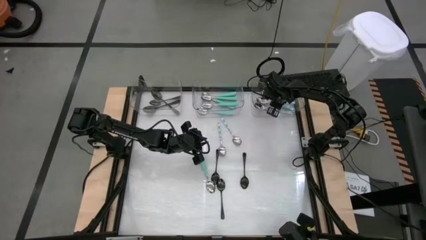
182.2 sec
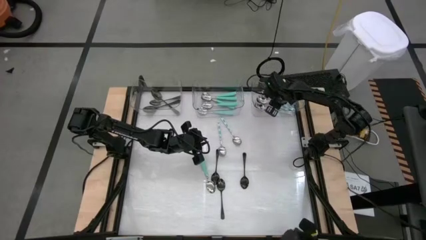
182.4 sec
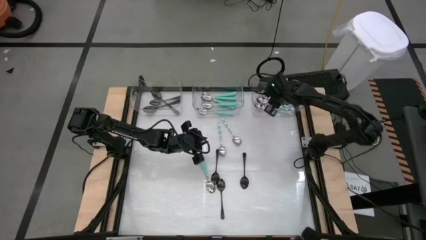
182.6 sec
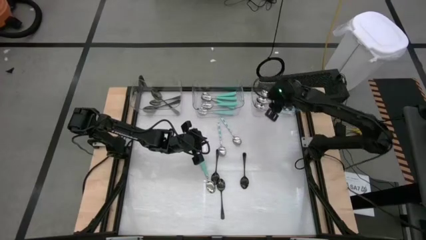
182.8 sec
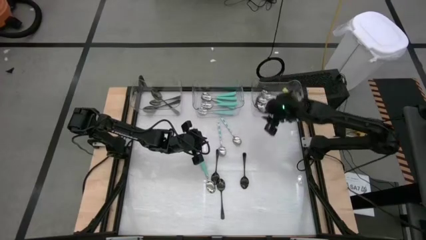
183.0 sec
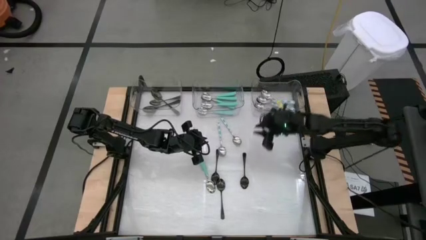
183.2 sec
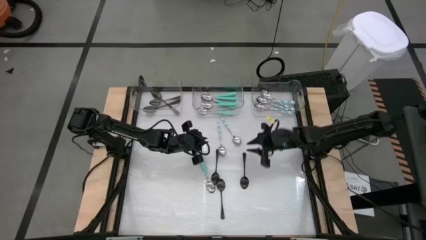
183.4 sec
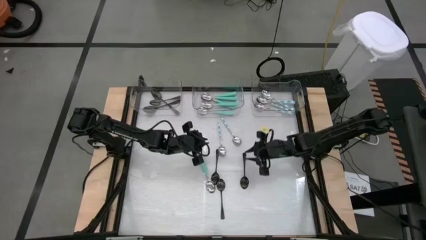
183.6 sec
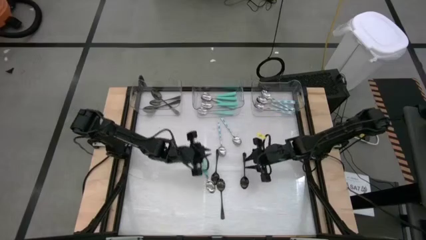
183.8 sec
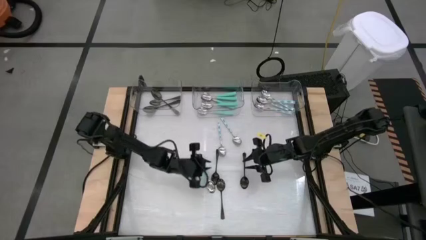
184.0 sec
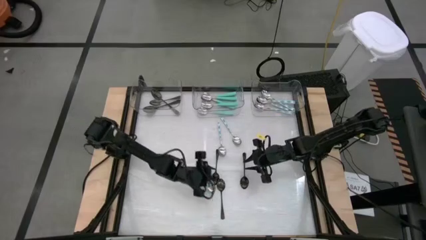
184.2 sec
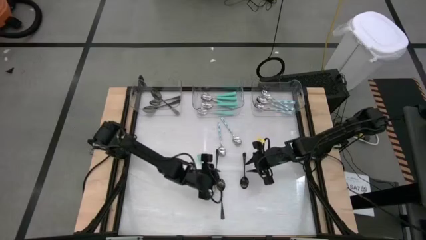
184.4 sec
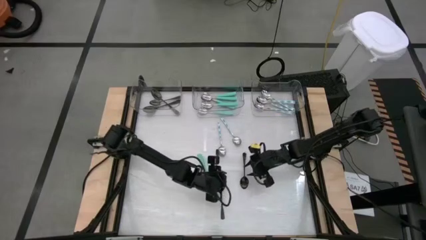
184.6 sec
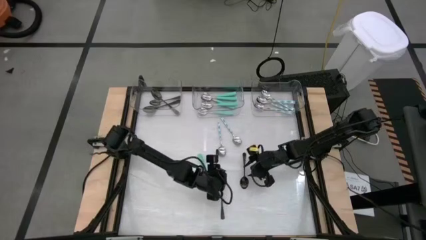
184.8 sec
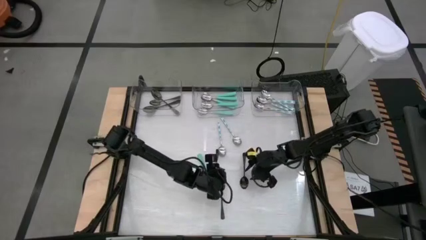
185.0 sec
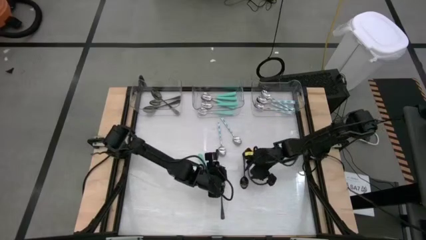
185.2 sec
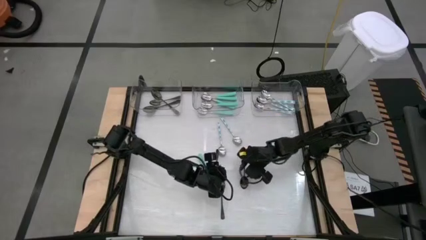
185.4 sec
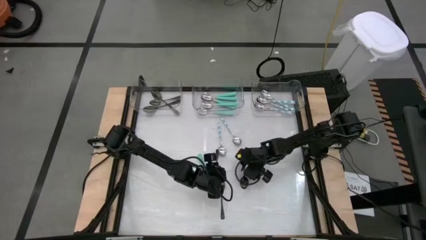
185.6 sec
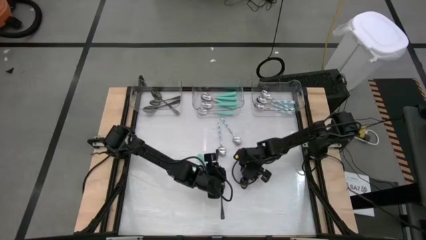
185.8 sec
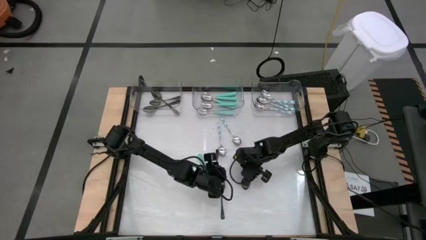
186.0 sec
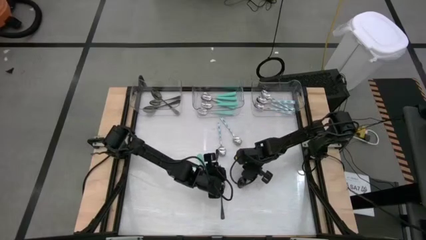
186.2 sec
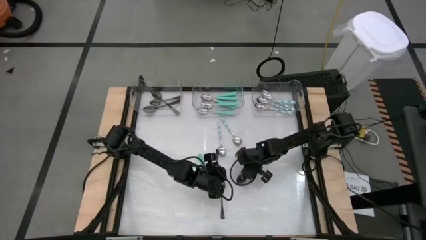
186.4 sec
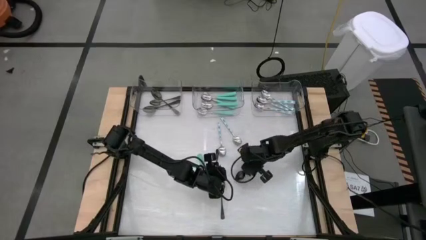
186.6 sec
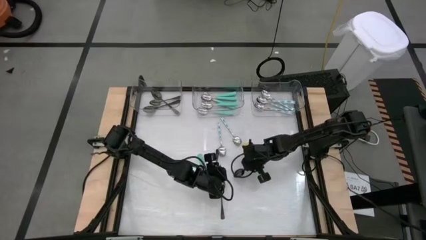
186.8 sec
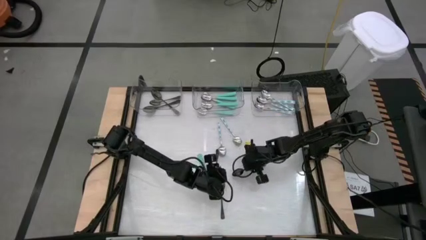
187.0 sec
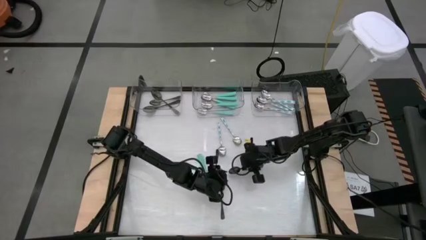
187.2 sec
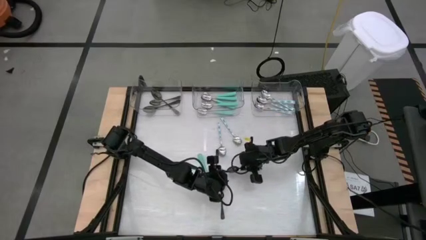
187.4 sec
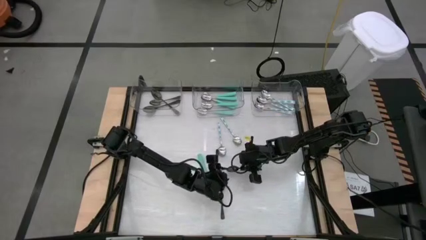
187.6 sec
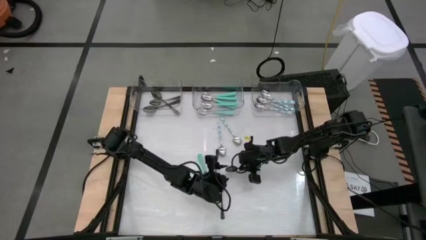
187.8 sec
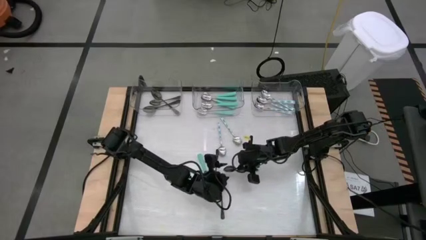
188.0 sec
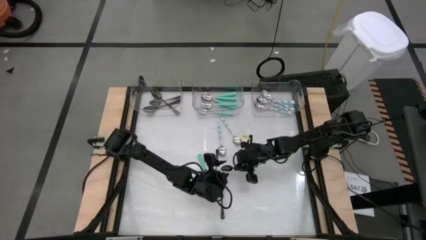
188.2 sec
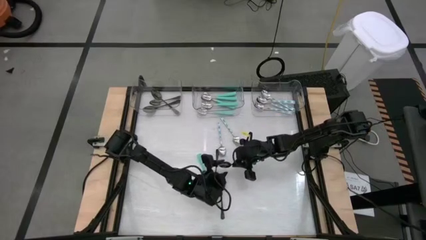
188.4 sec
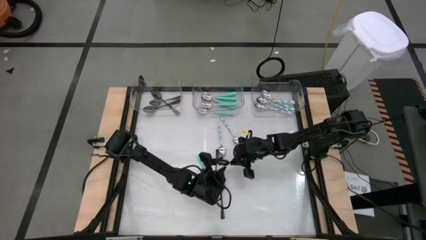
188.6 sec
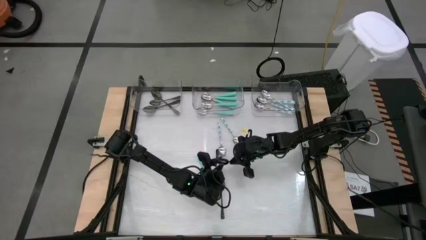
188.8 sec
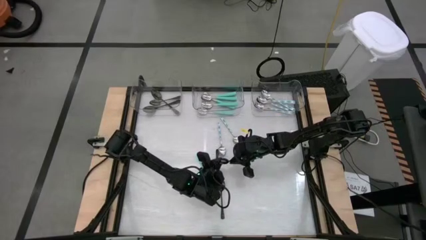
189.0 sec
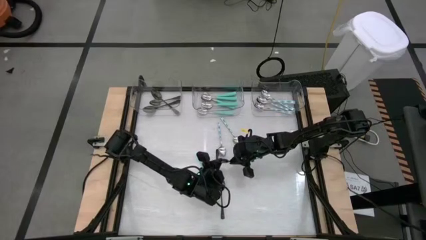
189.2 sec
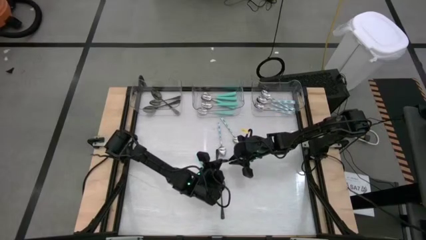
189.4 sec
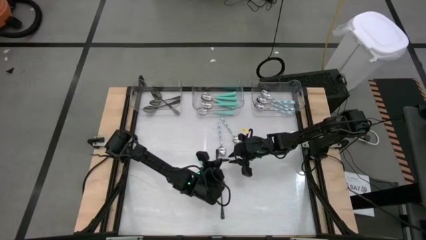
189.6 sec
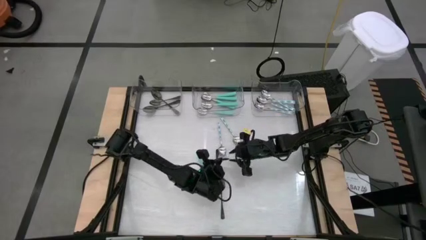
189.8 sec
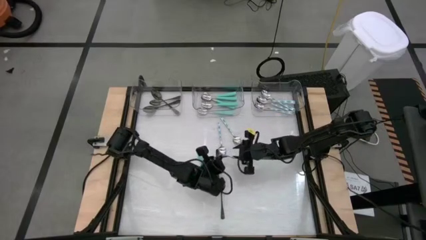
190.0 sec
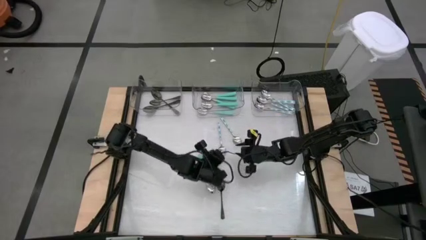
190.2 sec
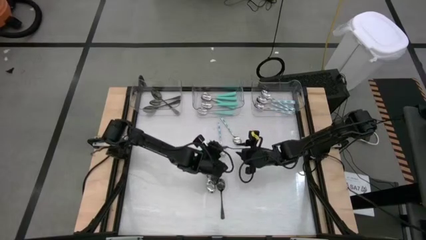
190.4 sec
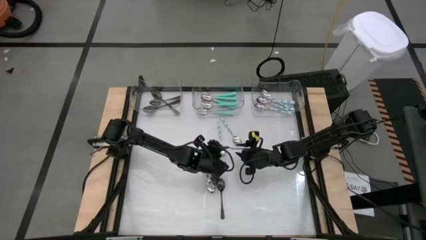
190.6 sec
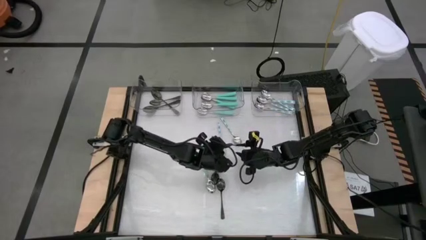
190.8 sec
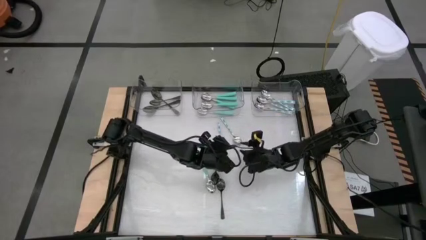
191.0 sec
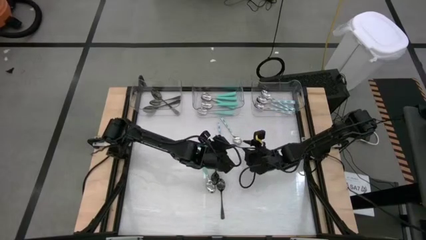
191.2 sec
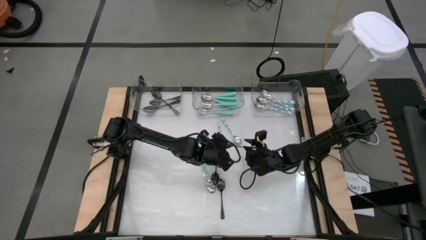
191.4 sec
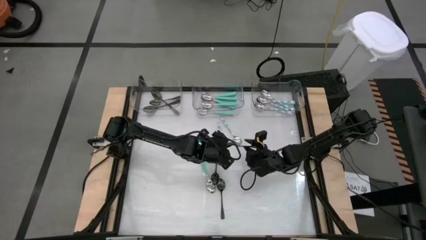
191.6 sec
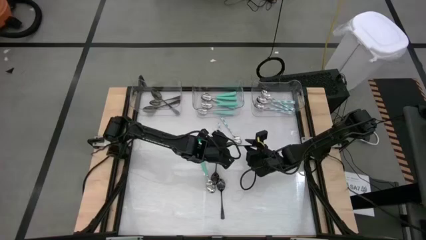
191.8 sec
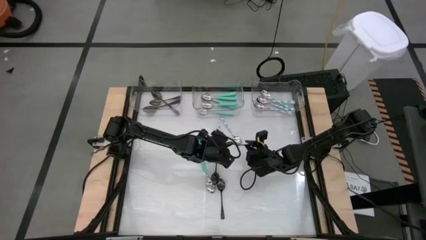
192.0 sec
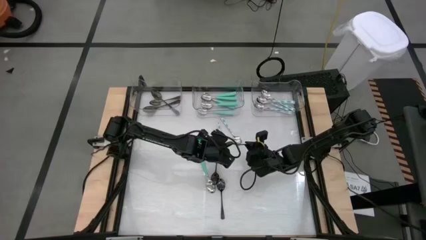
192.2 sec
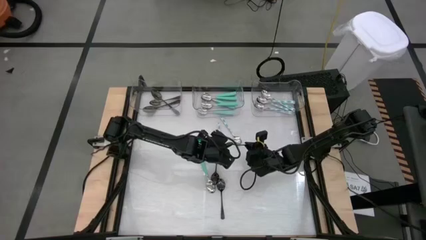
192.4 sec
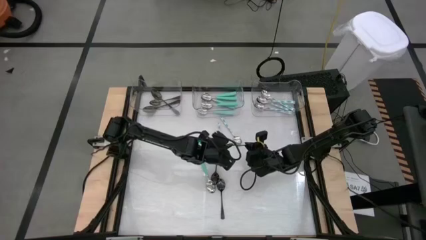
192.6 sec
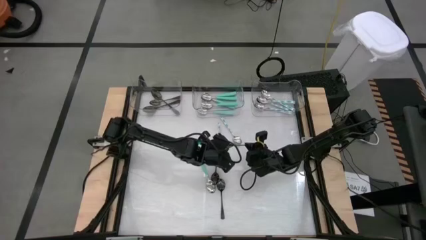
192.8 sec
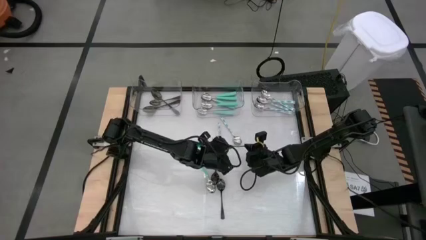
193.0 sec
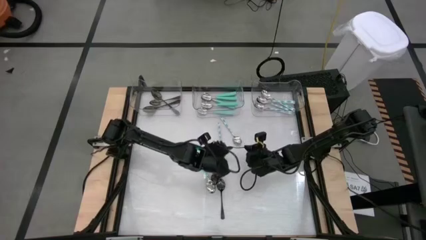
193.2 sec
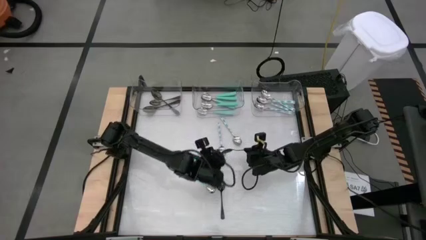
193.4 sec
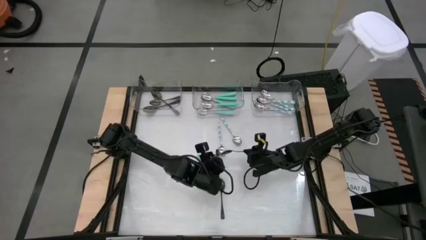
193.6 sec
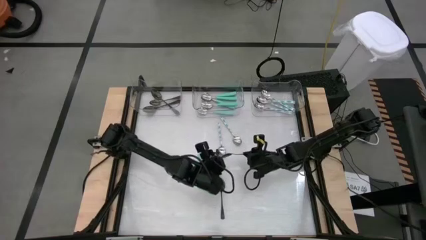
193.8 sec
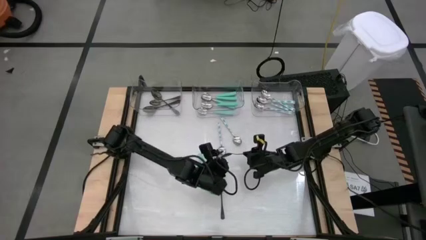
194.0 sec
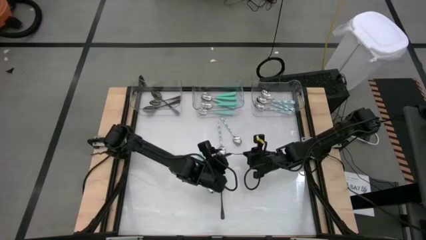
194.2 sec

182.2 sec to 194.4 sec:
Task: Sort silverware by color (type)
Put the black spoon into the left transparent bin
